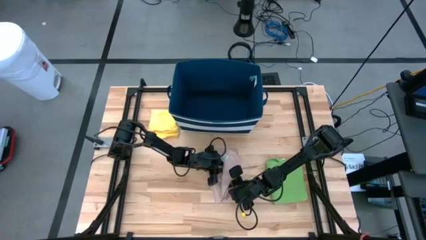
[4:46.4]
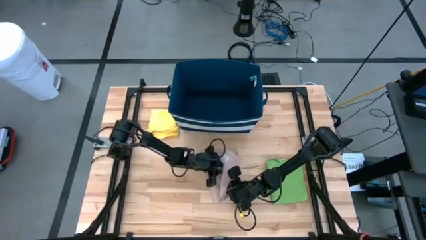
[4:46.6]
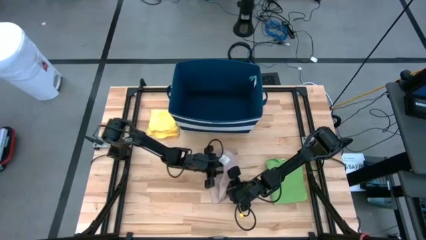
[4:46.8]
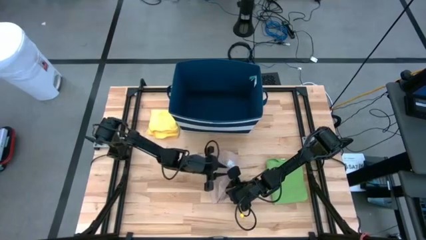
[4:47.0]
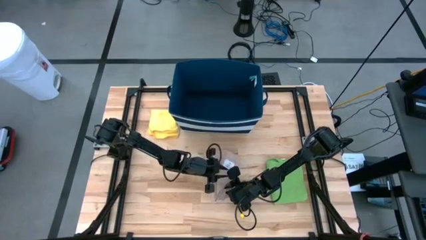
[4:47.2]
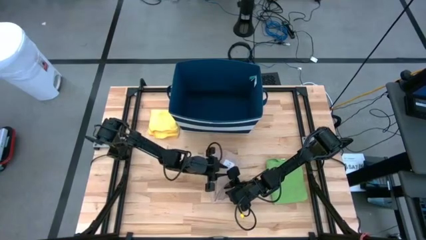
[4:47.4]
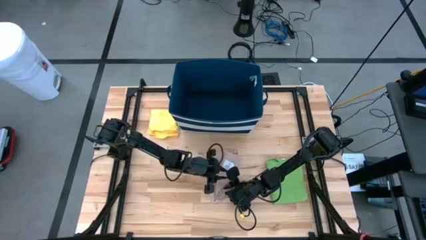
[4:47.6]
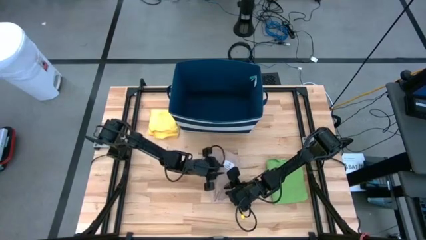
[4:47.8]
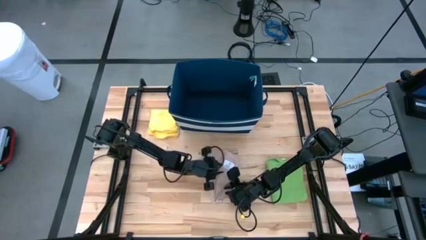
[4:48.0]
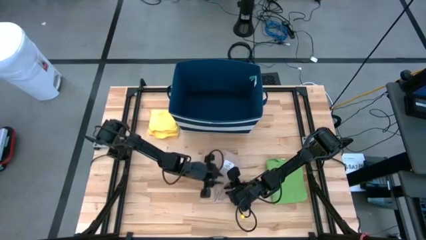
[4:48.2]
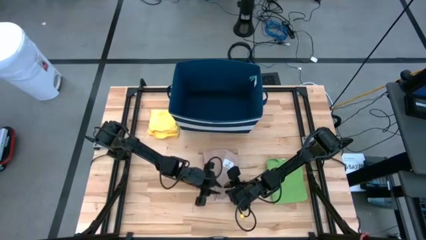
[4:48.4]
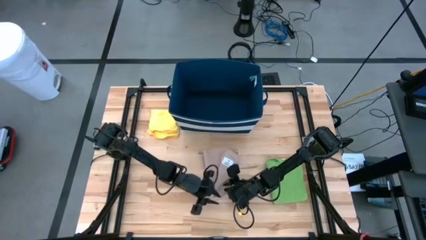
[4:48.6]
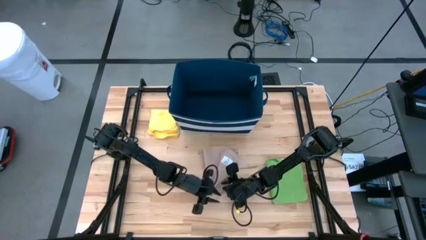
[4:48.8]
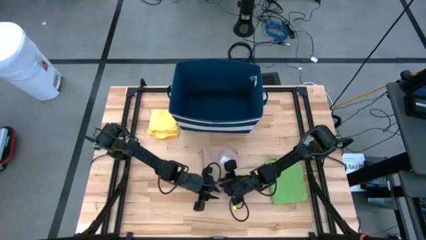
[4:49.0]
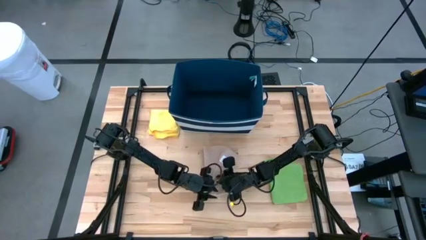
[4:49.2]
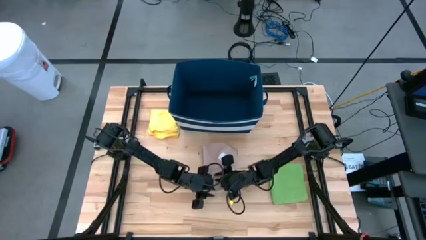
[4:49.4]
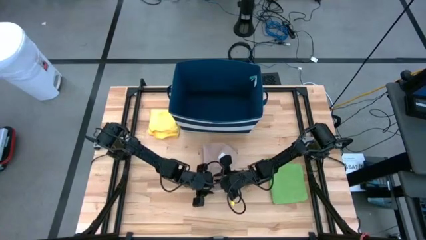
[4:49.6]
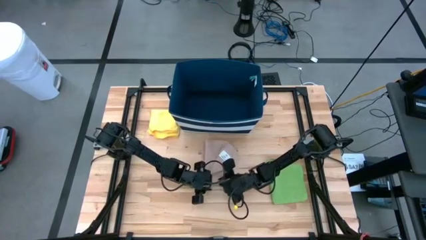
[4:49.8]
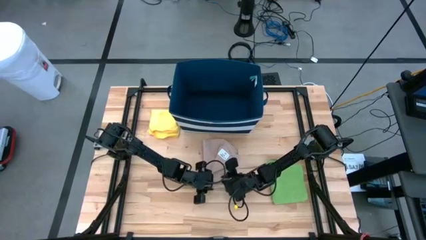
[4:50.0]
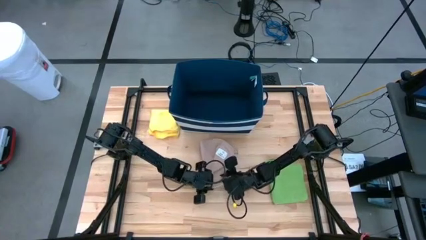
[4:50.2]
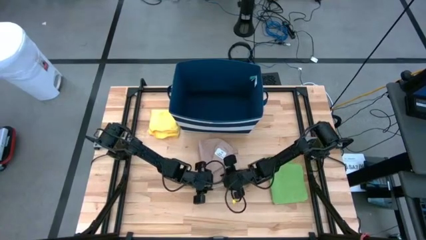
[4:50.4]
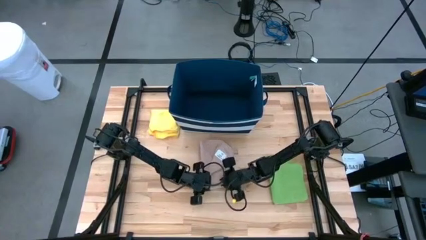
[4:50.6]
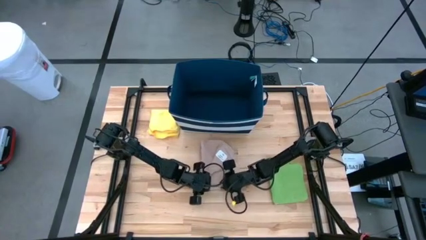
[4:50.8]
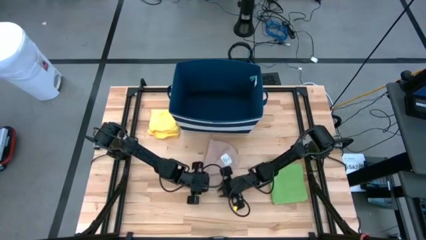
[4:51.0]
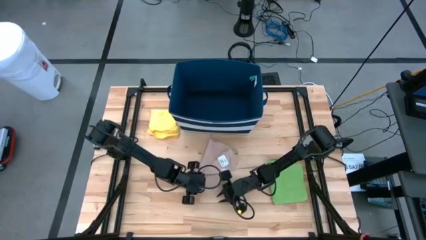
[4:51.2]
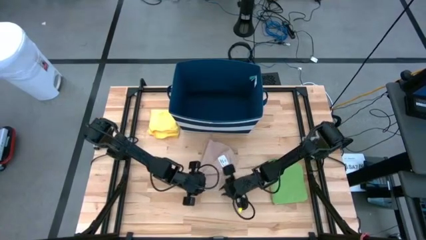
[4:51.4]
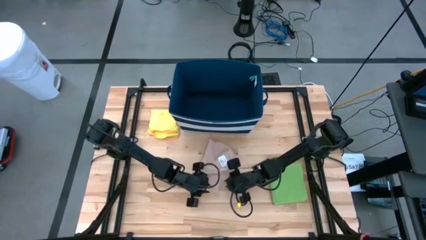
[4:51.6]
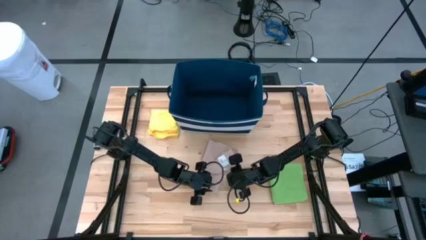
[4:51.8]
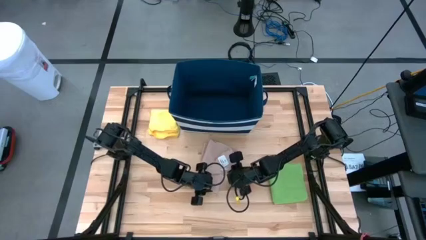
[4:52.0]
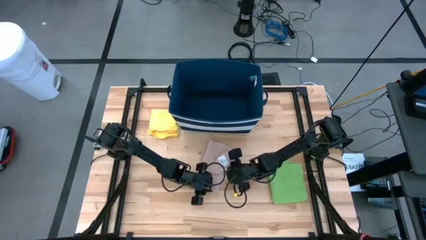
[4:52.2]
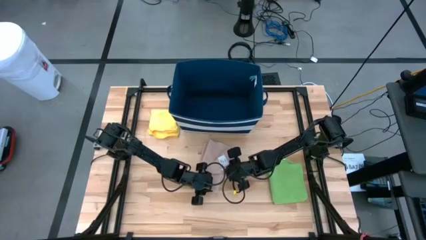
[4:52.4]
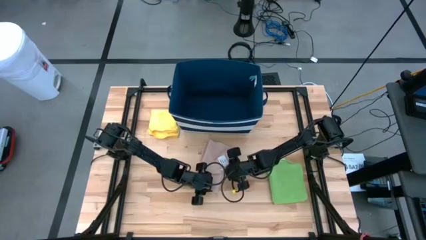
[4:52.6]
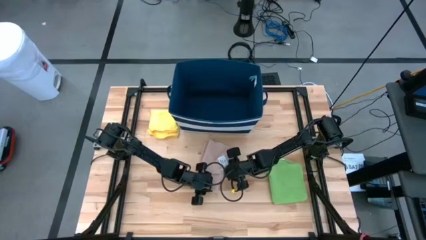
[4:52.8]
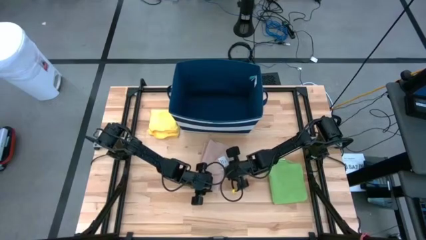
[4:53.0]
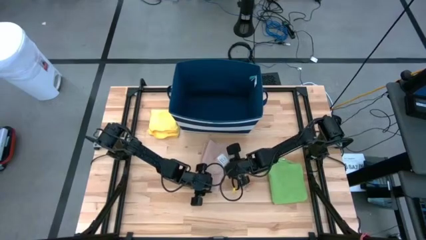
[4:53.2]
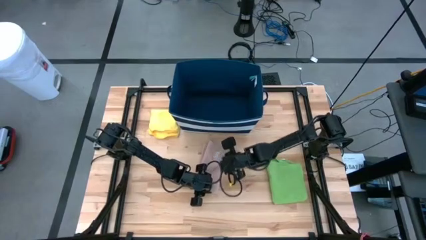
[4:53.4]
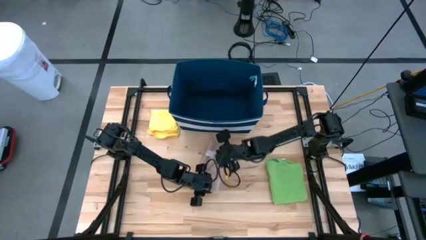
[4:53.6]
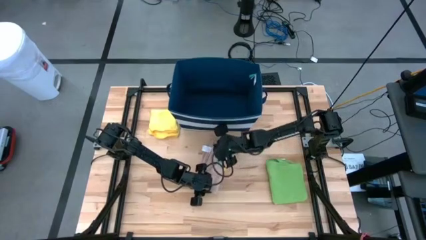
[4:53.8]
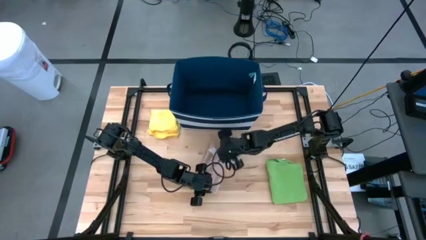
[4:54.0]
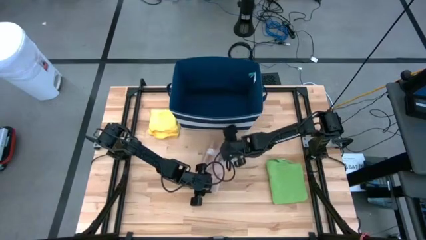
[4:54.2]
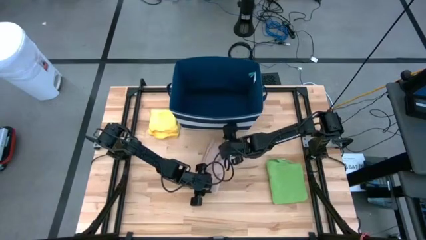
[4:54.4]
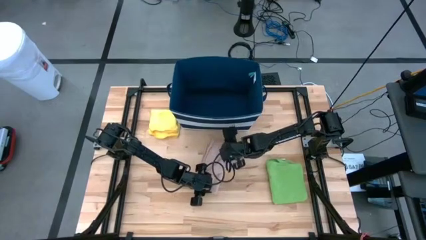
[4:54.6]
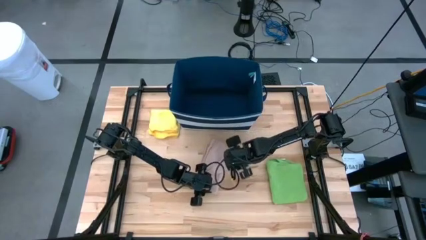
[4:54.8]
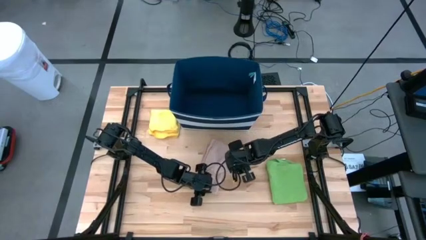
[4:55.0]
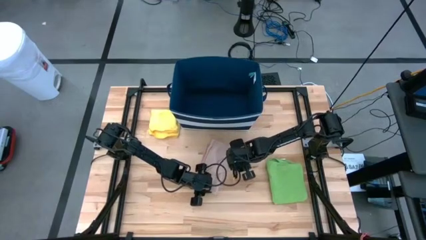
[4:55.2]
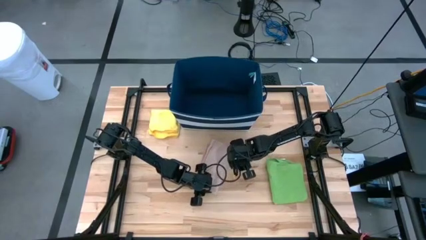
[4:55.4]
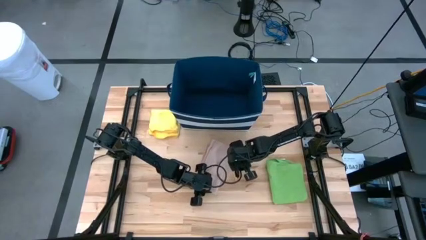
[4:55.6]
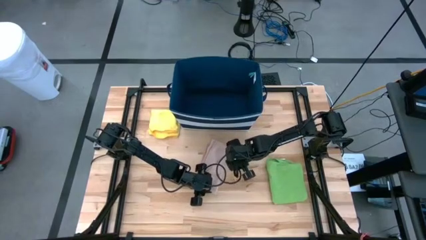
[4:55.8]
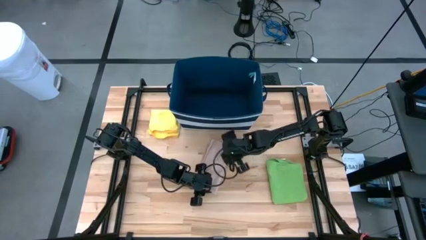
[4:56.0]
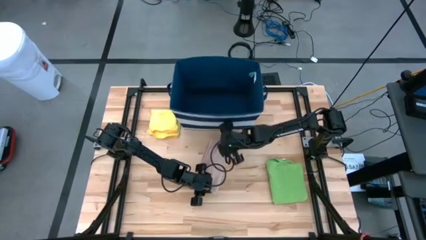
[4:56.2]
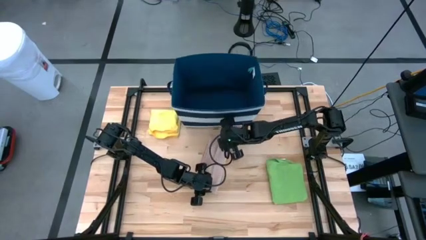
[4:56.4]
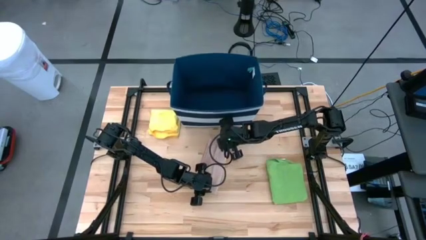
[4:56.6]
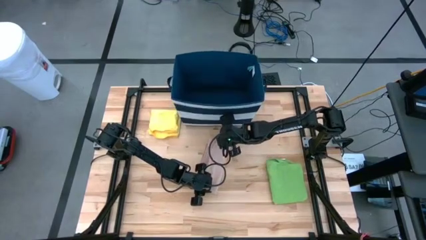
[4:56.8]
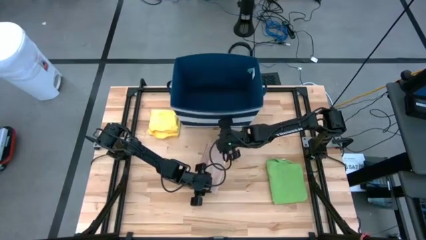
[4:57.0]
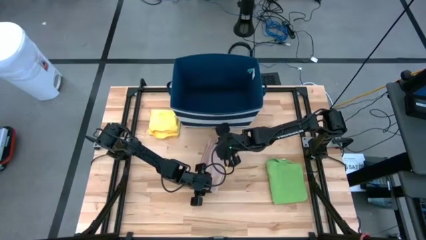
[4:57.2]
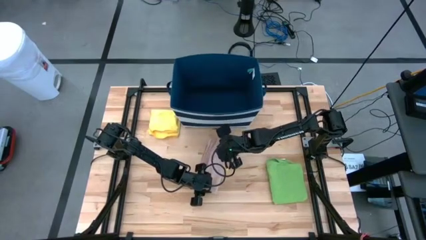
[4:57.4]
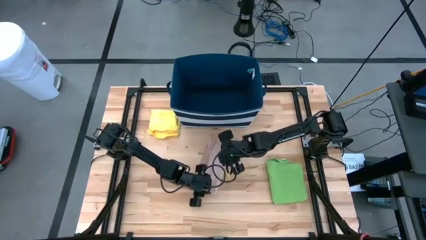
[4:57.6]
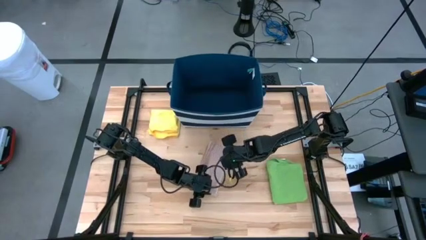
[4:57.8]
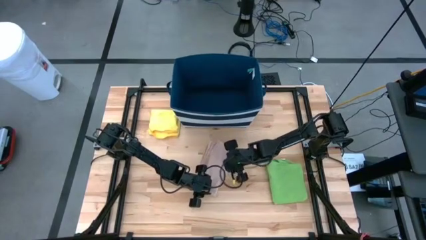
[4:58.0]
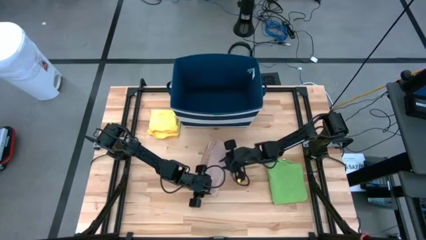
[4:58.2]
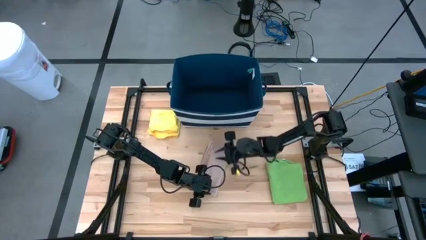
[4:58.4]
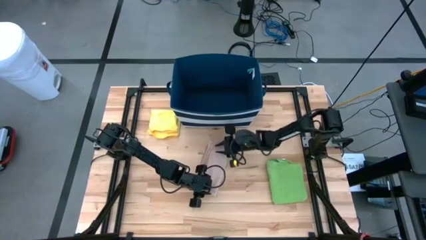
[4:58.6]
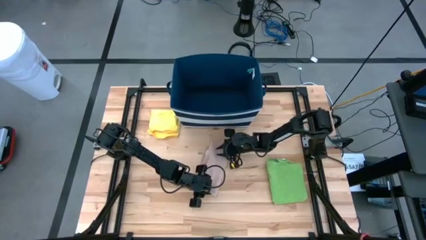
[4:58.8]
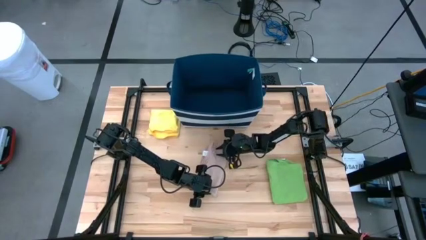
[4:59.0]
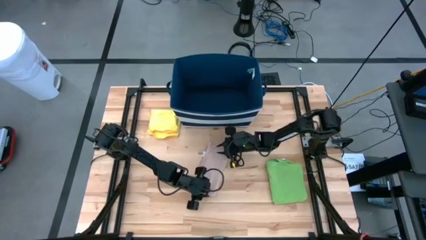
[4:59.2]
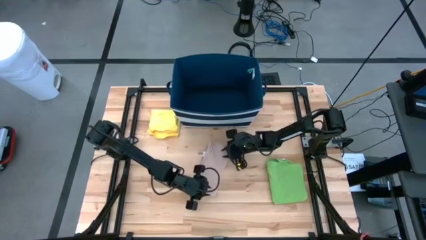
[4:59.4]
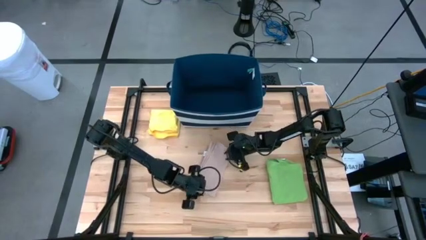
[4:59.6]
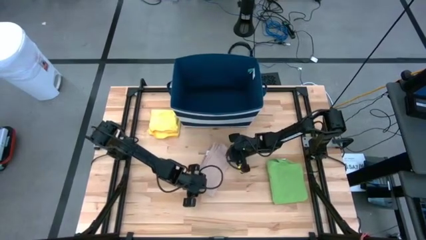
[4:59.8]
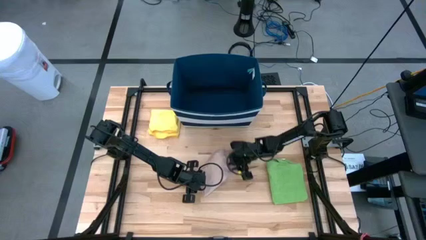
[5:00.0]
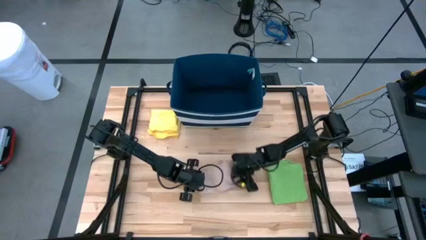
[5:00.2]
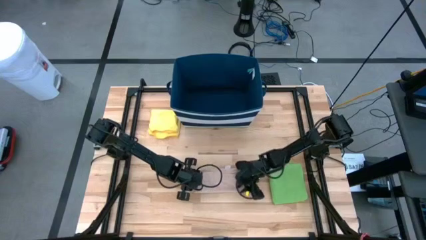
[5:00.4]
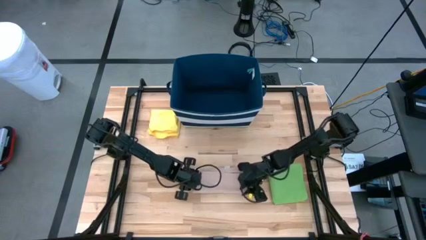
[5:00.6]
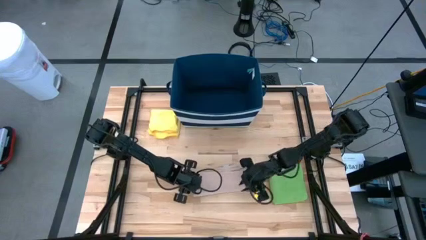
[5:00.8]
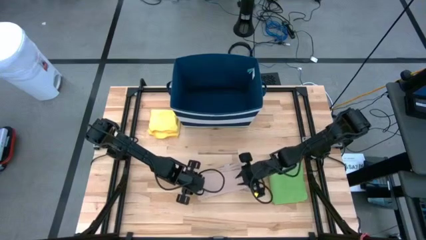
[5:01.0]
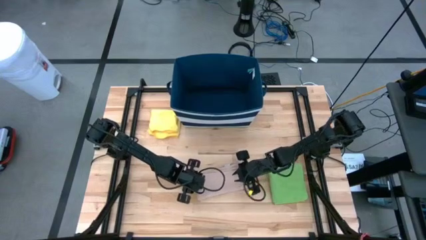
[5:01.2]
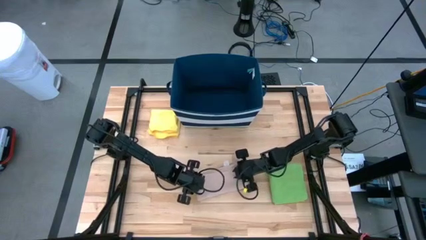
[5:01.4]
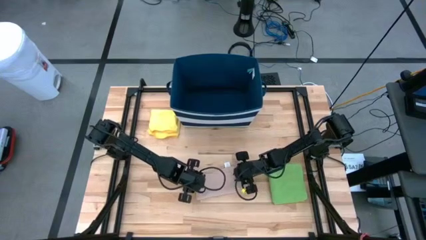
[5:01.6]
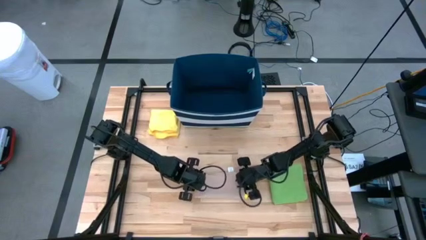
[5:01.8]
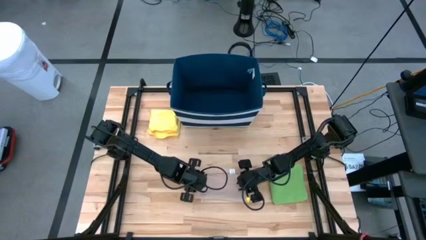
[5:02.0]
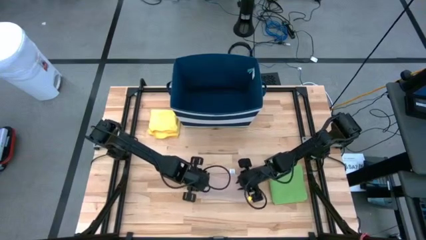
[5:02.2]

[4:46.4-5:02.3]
Task: Fold towel
Fold the light pink towel
